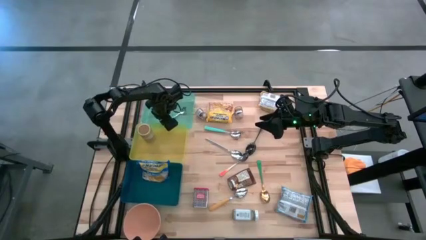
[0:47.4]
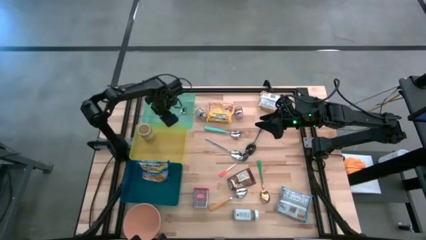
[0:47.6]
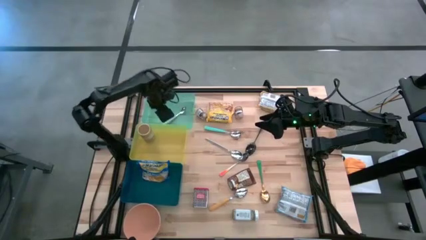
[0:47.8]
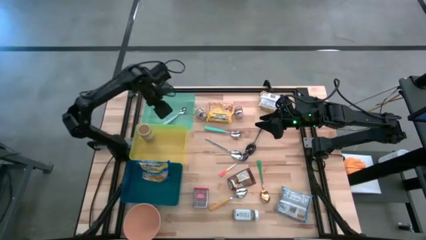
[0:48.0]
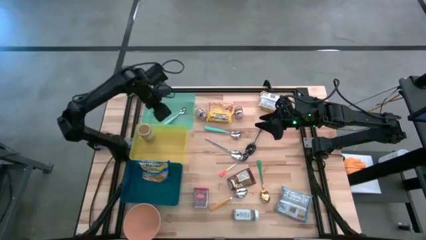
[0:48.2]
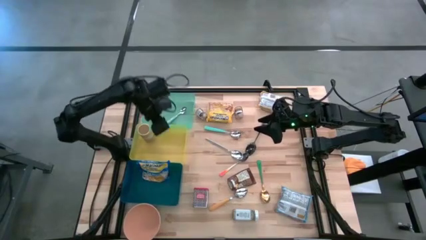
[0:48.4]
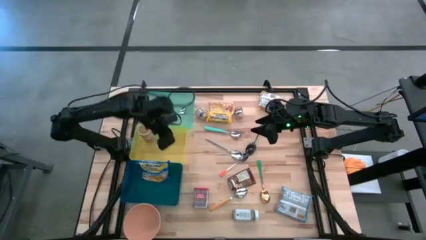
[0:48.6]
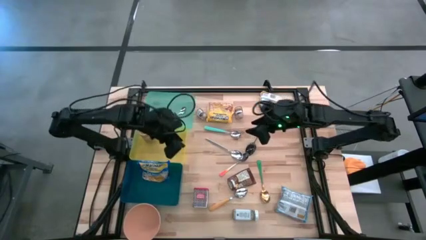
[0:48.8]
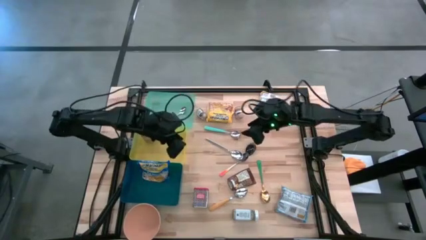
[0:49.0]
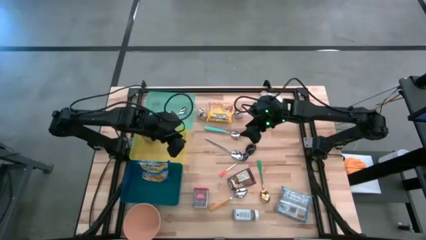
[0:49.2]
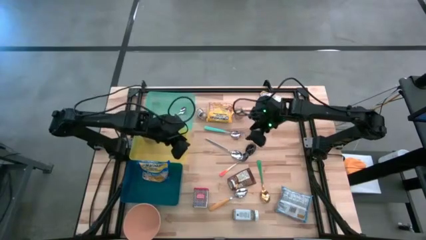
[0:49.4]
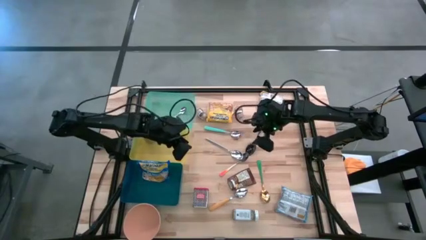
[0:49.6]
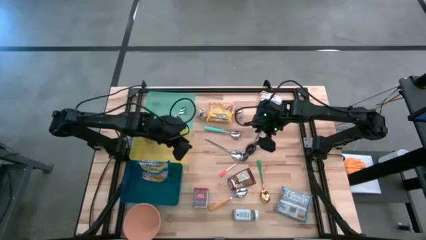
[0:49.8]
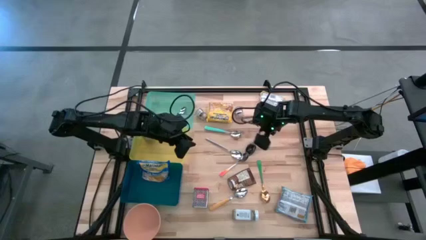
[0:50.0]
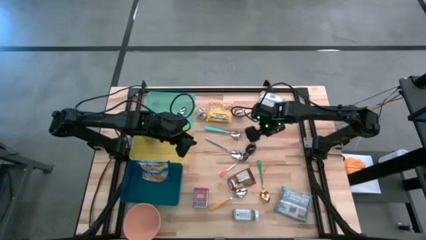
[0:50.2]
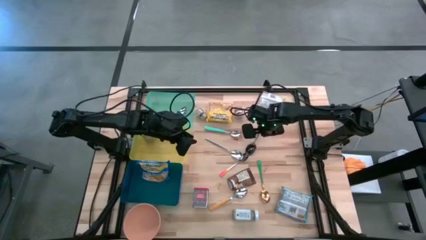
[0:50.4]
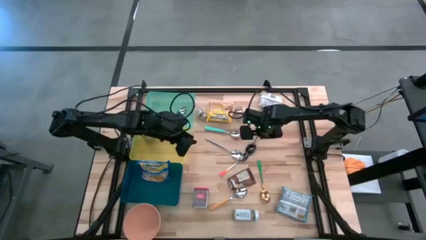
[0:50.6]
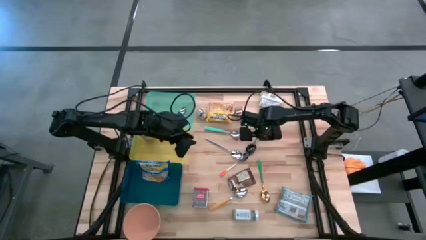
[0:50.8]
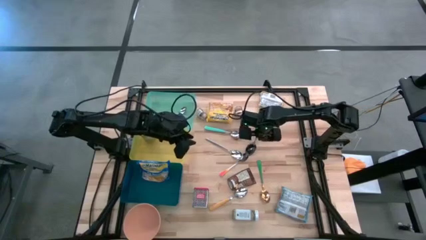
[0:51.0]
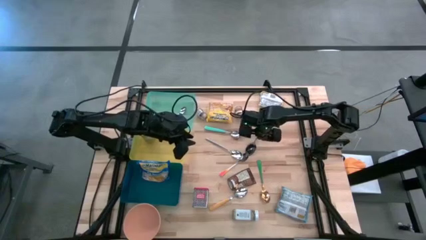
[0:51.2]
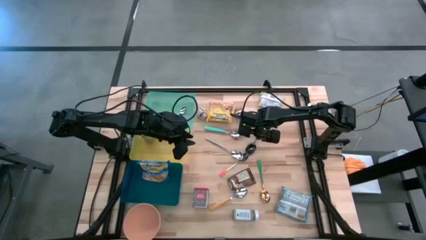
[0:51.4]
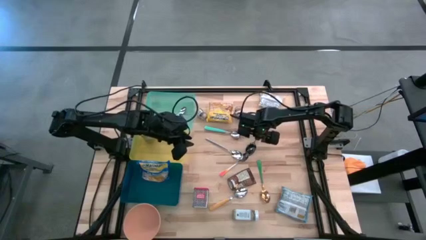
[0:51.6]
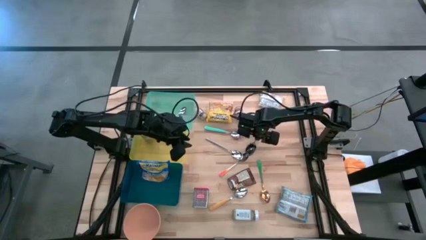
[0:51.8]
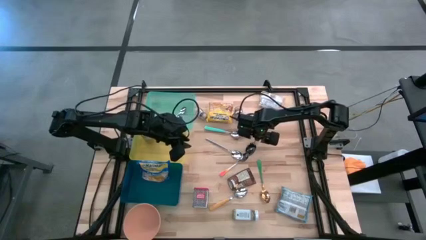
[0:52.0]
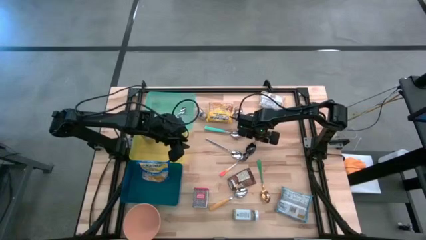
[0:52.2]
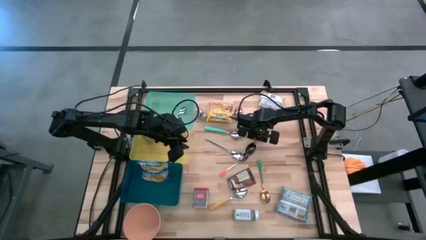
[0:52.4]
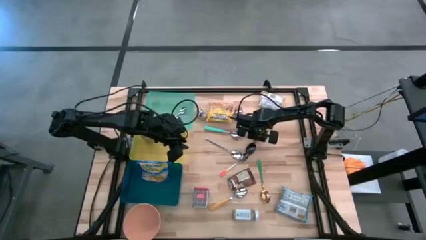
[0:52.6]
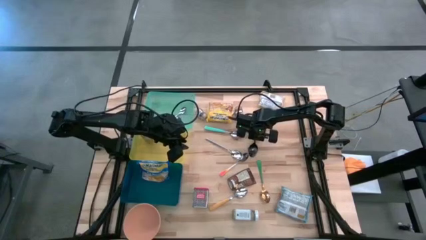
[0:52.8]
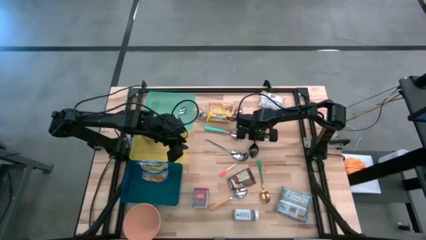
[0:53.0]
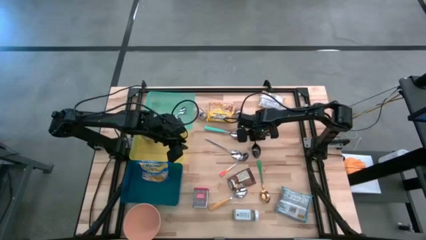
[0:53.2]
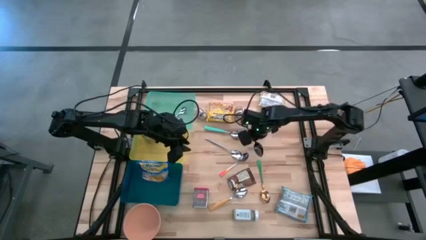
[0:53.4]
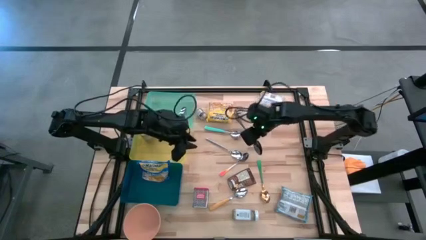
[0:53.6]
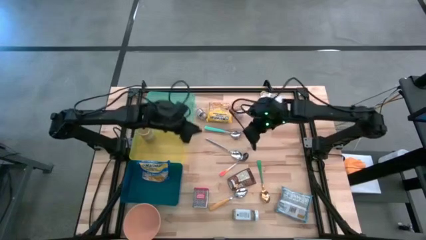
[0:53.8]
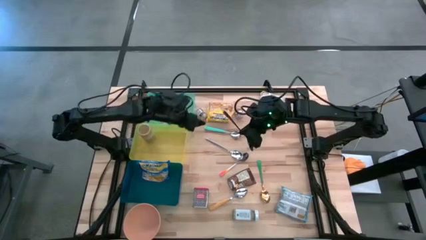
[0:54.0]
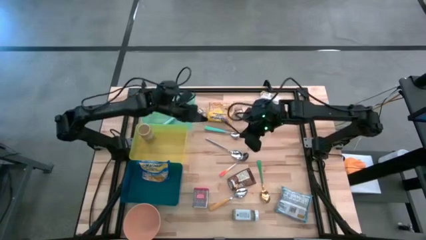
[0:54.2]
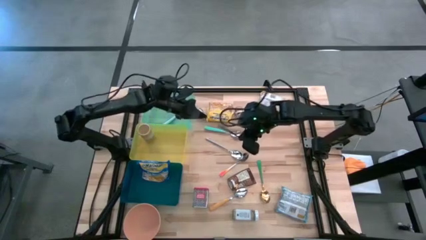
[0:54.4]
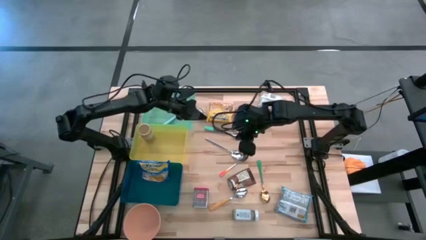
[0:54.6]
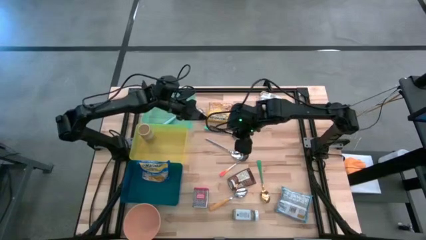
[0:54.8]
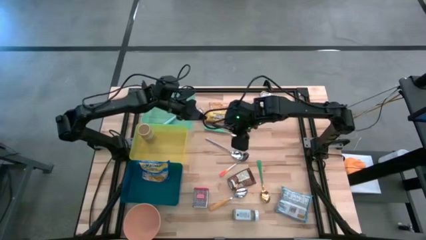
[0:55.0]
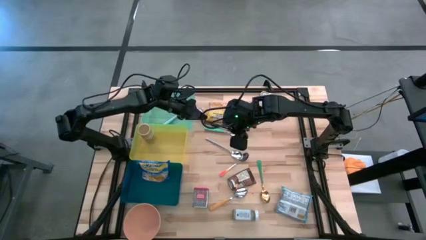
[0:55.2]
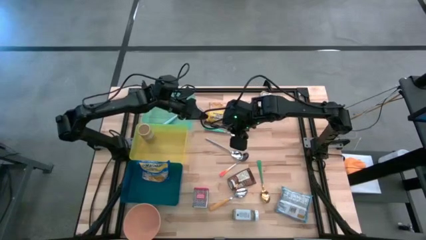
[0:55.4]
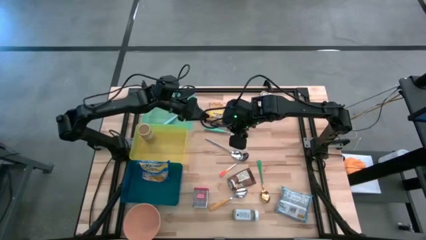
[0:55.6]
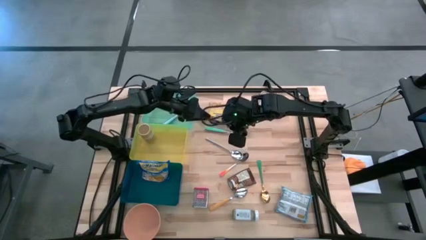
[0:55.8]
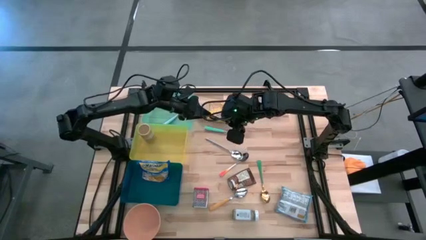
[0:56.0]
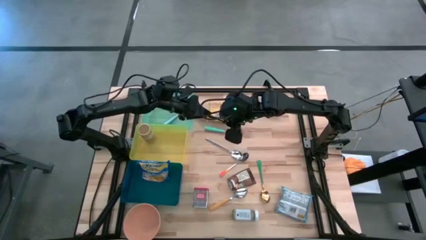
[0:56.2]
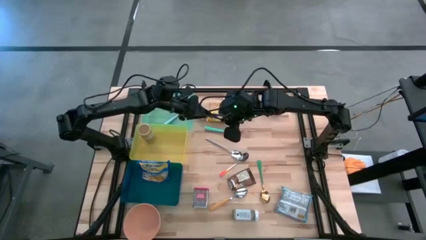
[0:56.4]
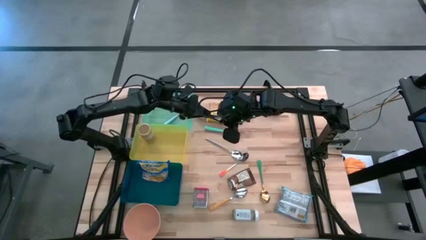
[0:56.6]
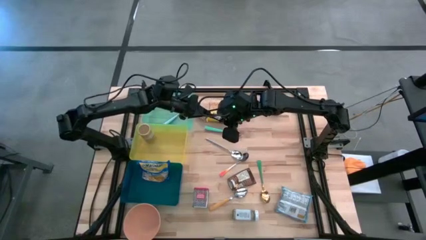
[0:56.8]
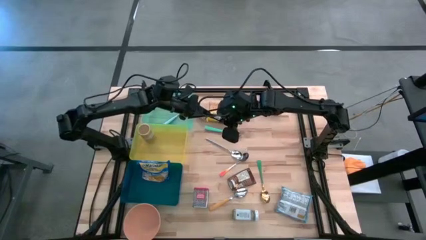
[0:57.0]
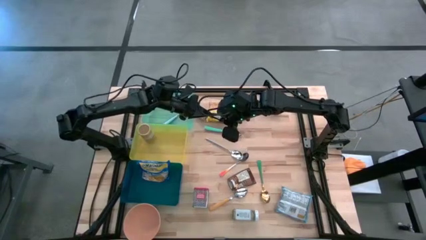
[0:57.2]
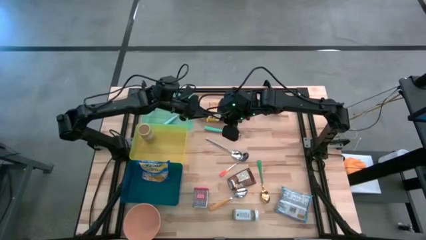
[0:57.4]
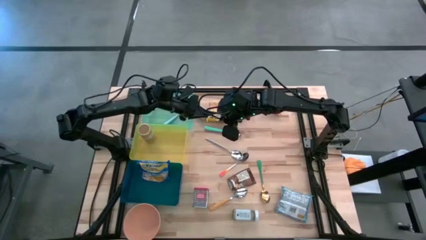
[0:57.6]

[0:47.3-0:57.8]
Put the black spoon into the green bin
